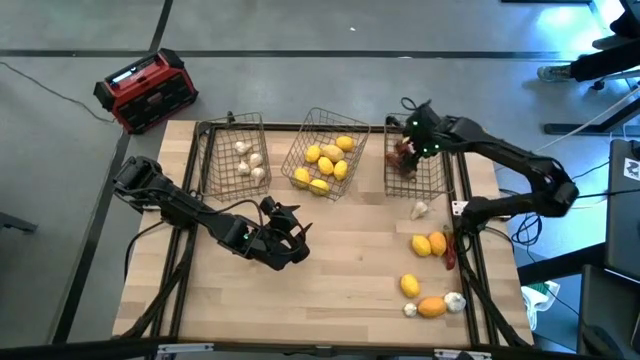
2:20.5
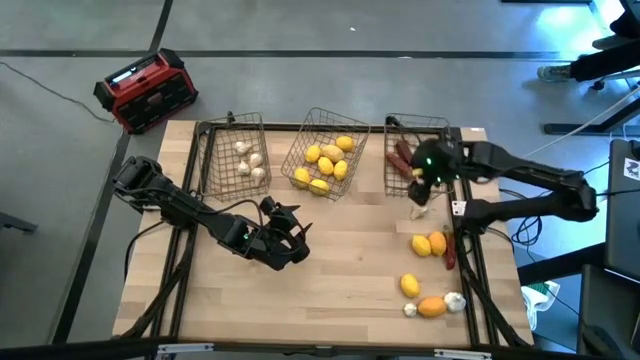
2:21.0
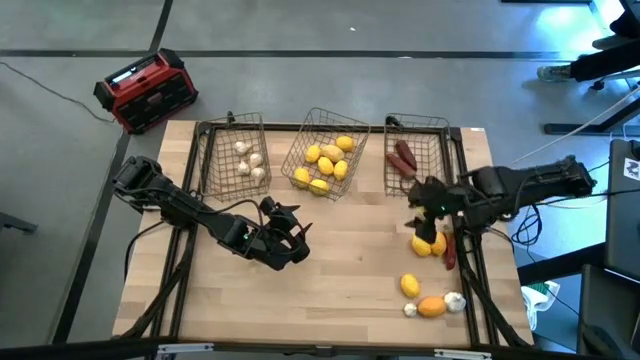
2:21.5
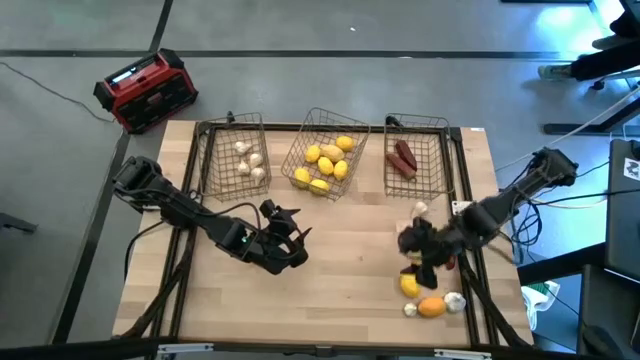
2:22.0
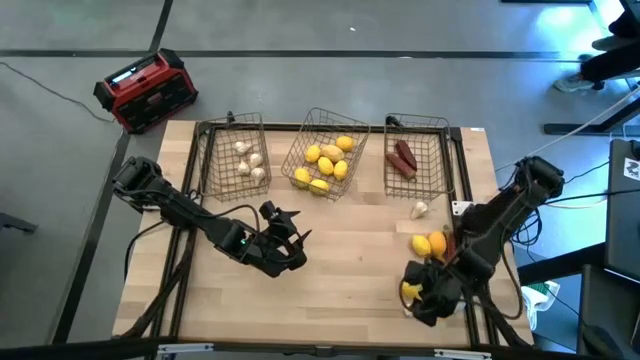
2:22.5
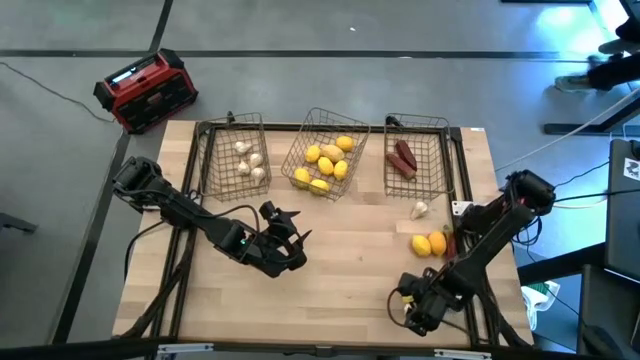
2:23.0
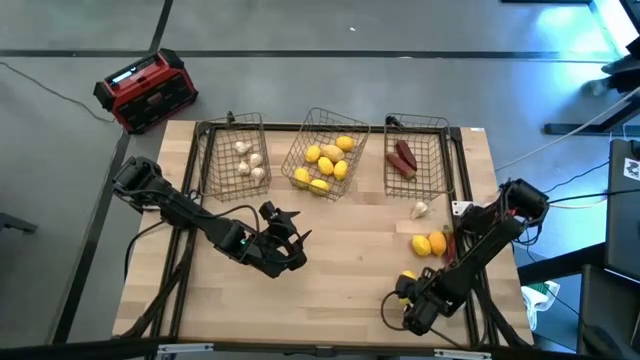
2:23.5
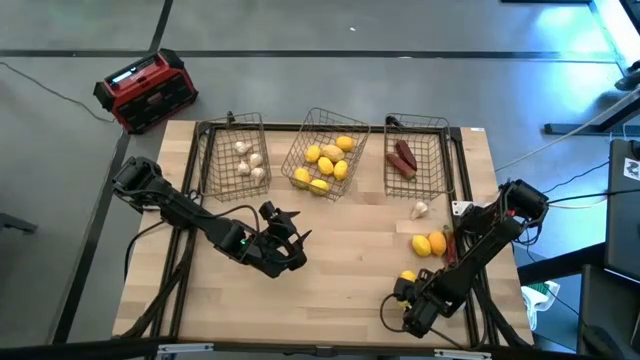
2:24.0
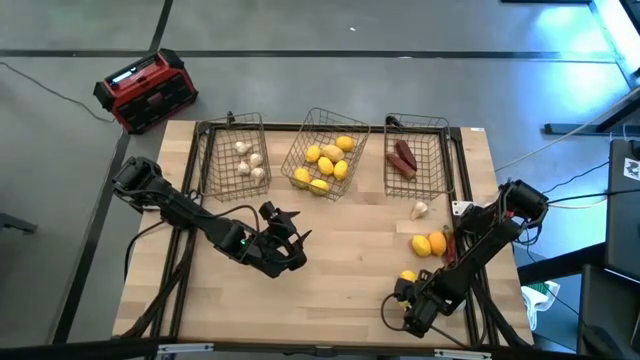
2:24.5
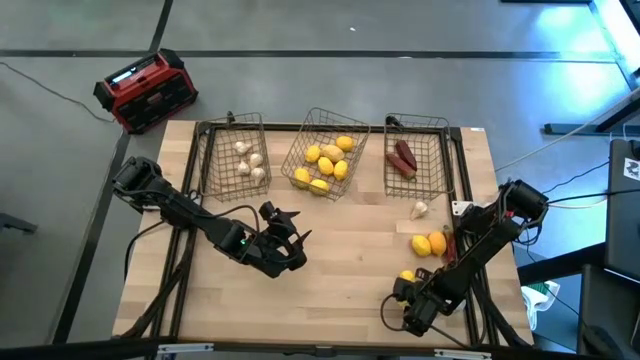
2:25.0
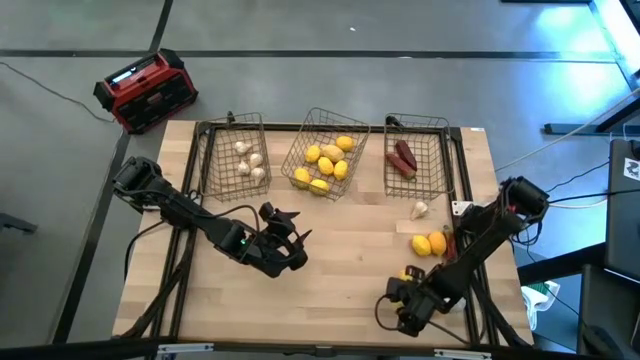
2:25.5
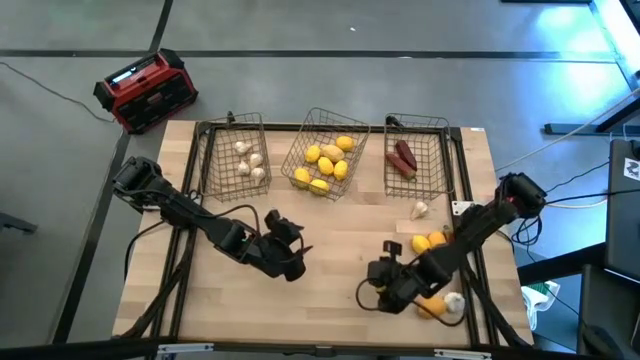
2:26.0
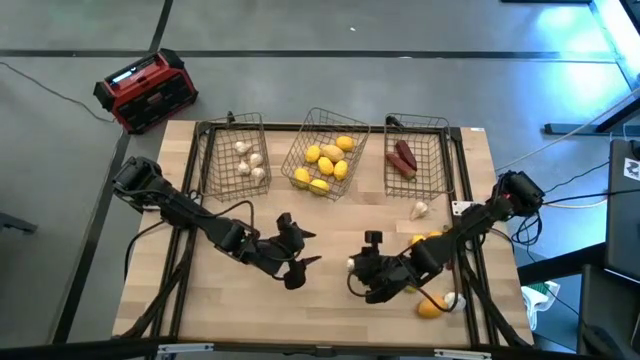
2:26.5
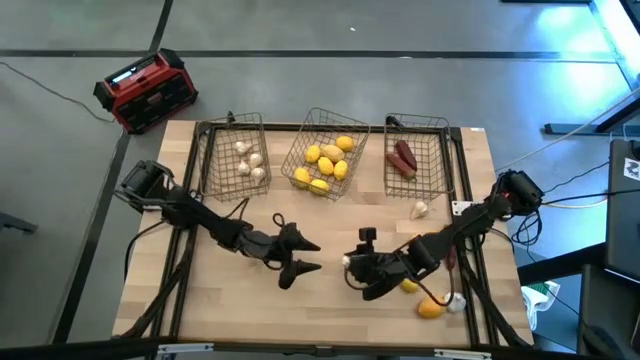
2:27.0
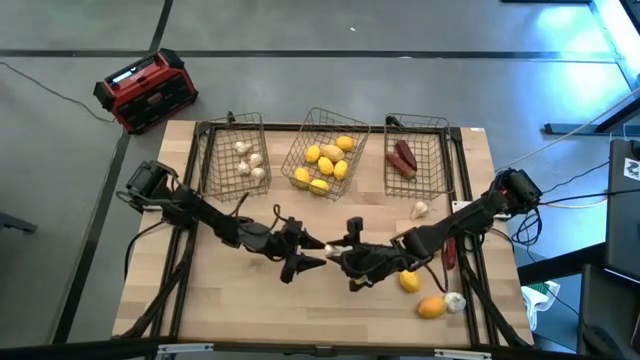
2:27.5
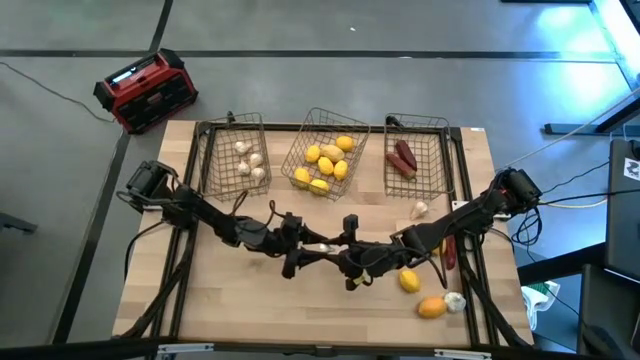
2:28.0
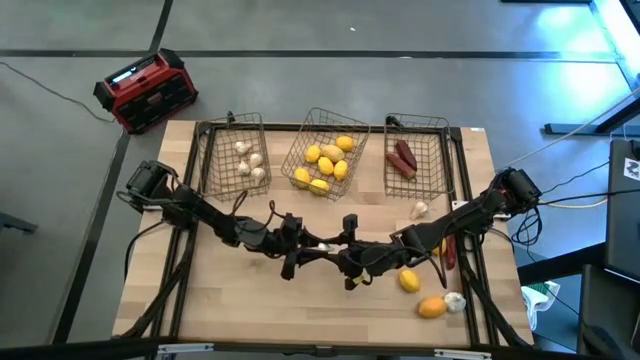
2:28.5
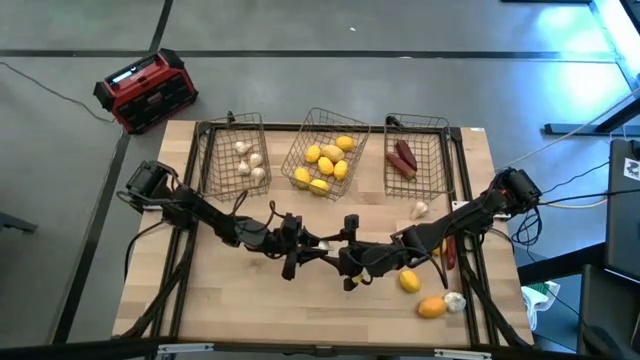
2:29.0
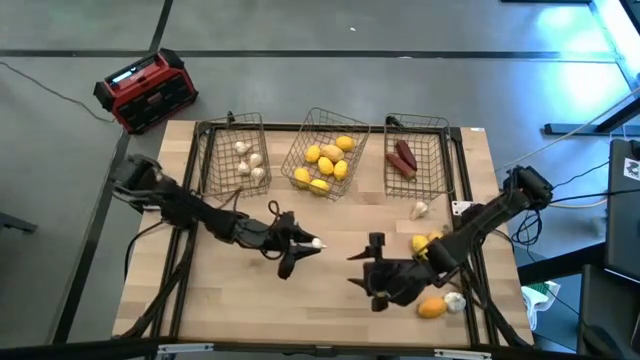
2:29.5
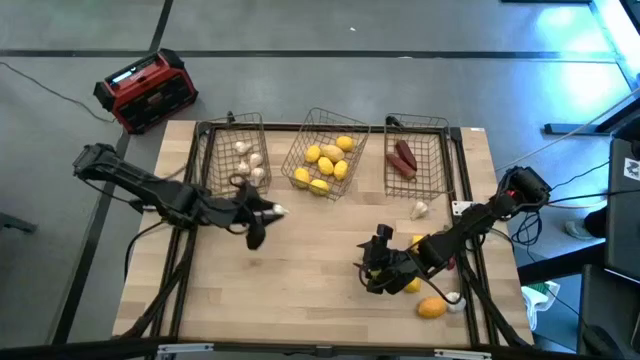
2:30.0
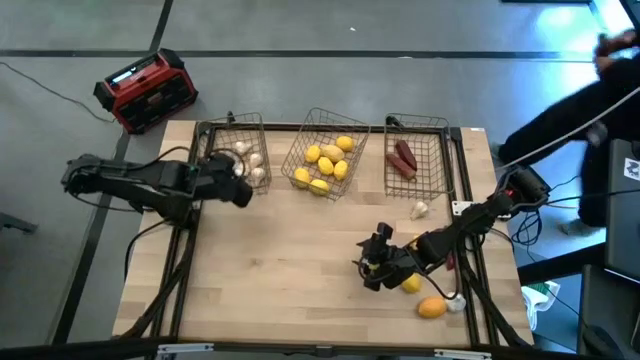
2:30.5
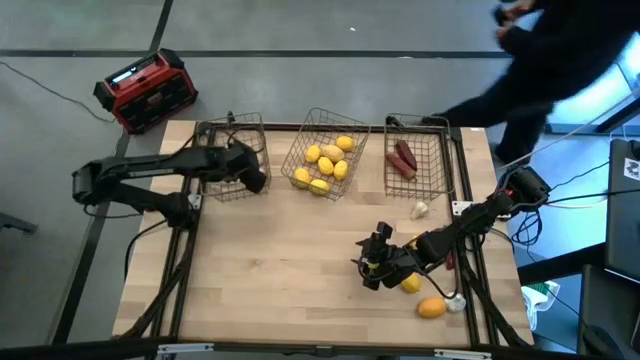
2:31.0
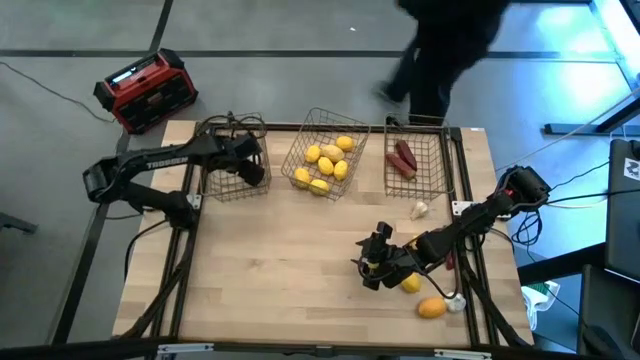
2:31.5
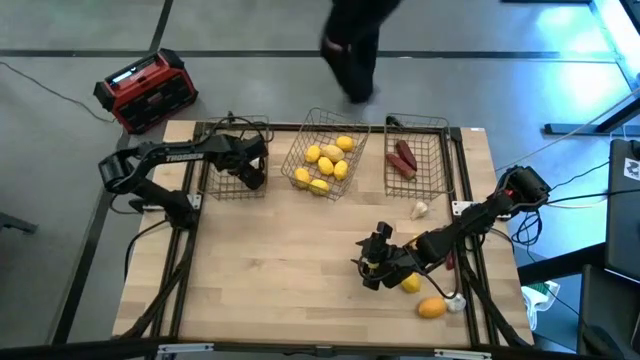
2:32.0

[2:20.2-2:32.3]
Task: Sort produce into baskets
Put the garlic into the left wire basket

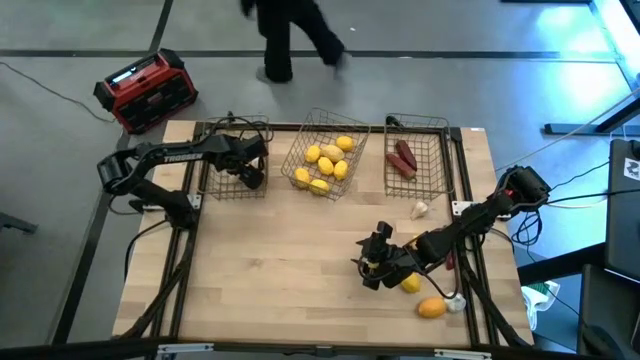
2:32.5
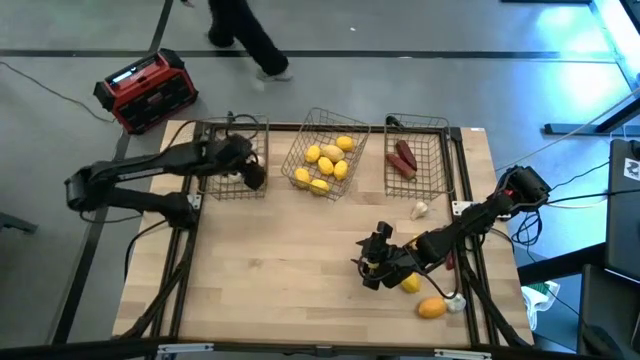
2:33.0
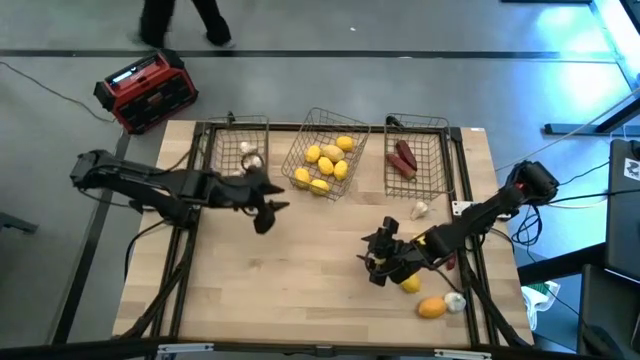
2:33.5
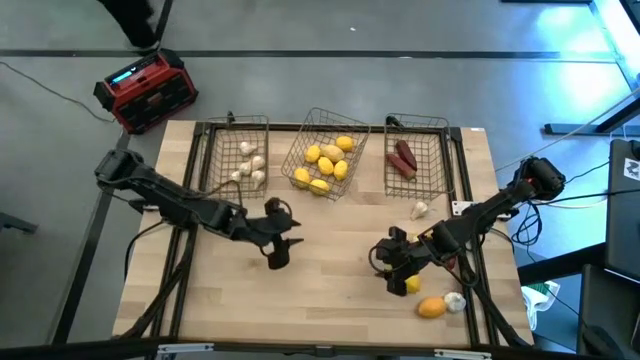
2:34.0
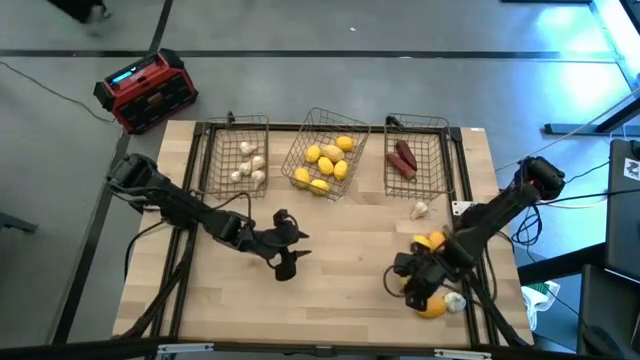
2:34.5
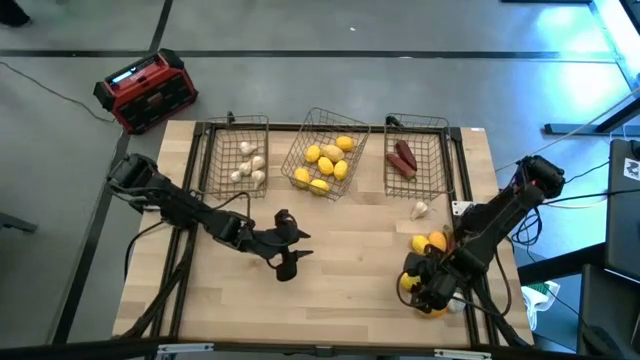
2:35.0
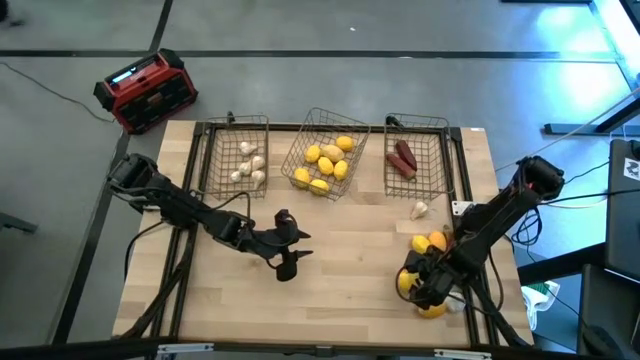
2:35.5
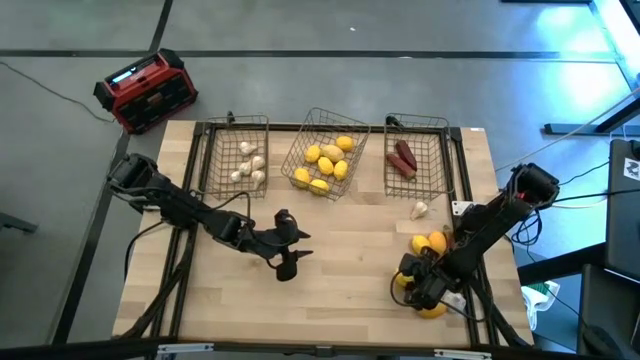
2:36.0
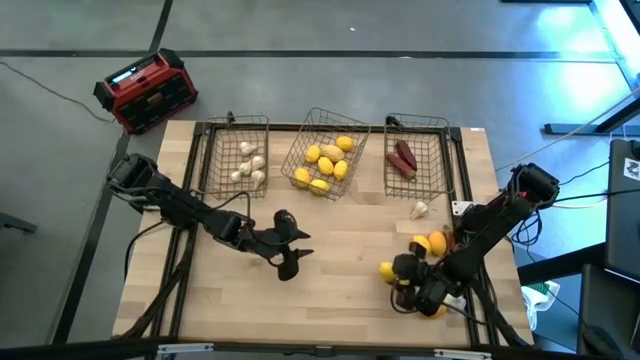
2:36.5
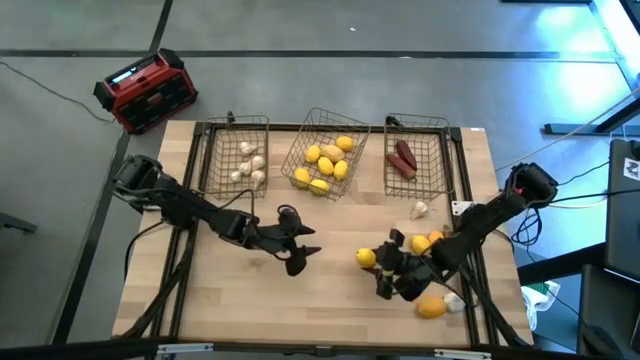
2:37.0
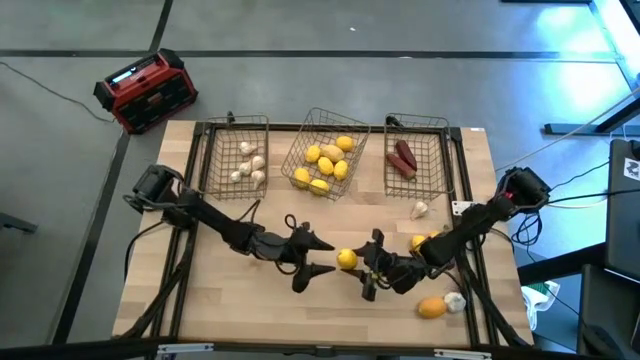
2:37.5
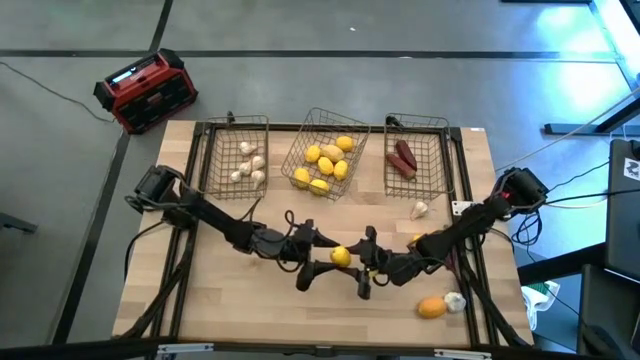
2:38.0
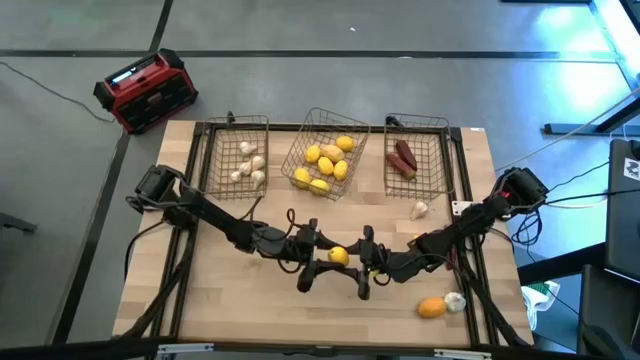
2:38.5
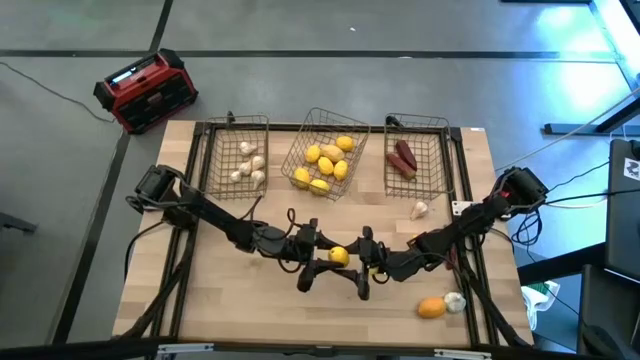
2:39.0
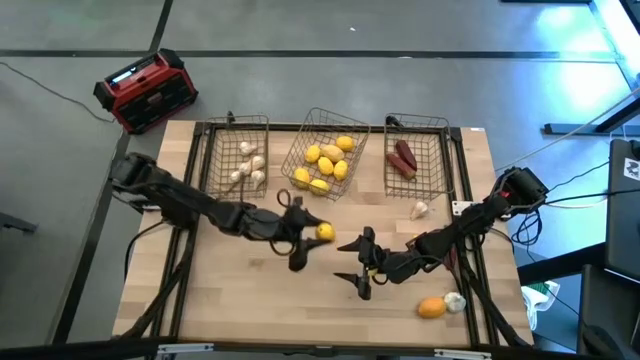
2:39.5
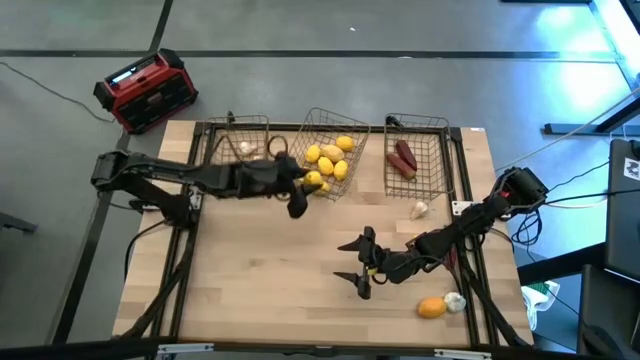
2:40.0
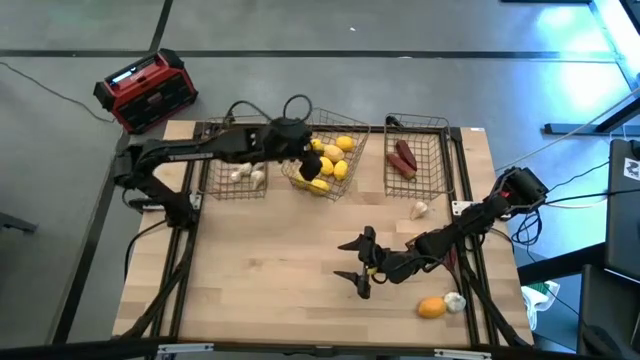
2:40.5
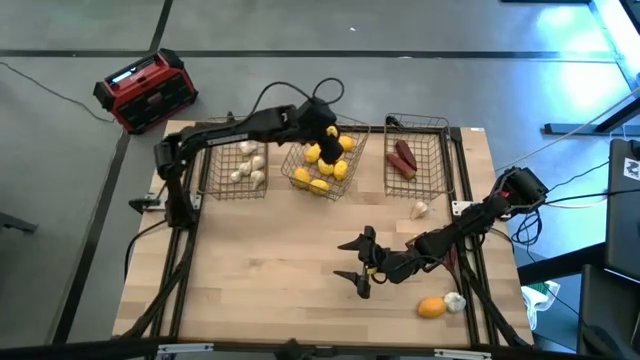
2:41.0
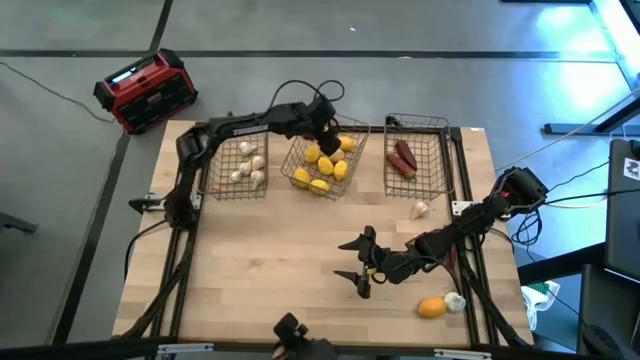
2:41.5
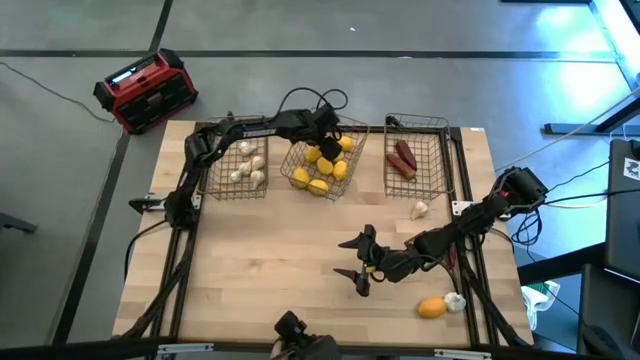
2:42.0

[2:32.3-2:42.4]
Put the lemon into the middle wire basket
